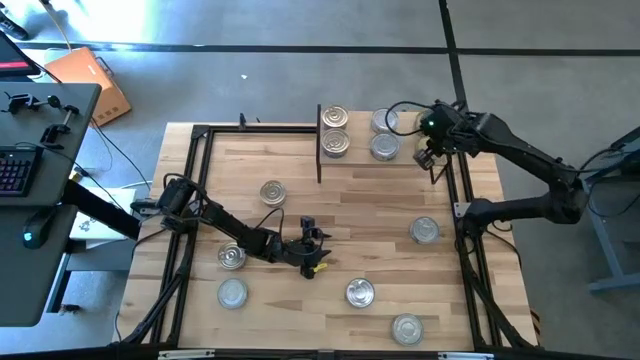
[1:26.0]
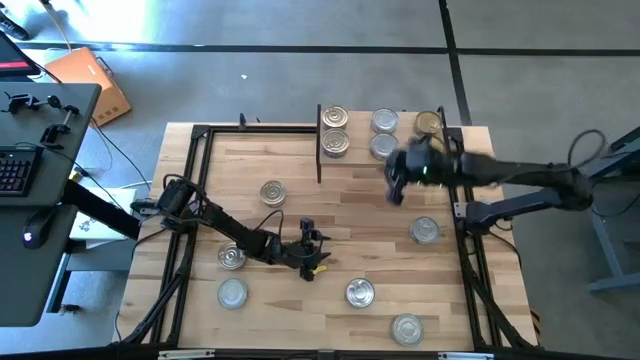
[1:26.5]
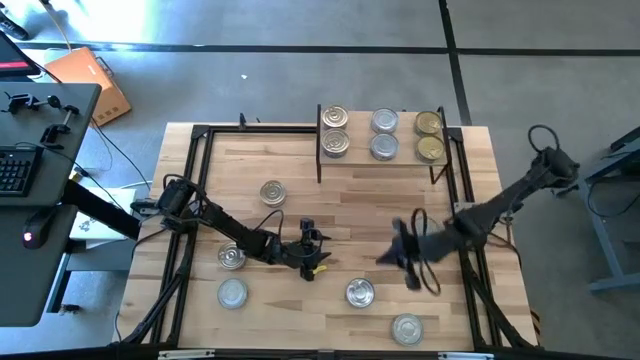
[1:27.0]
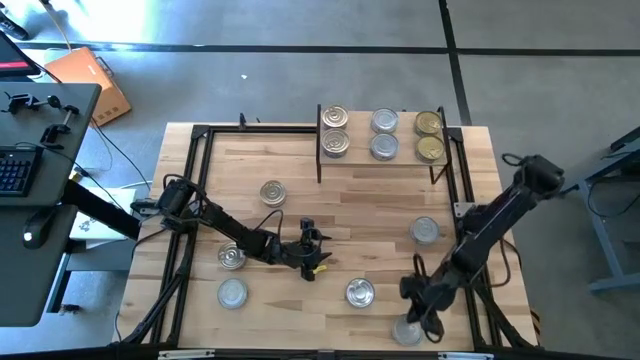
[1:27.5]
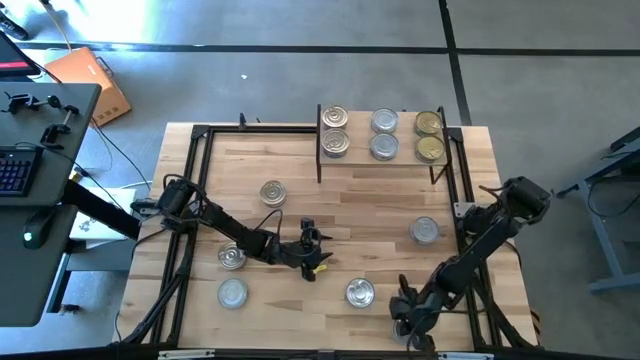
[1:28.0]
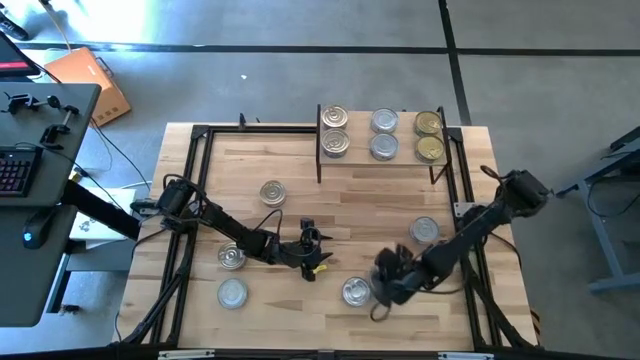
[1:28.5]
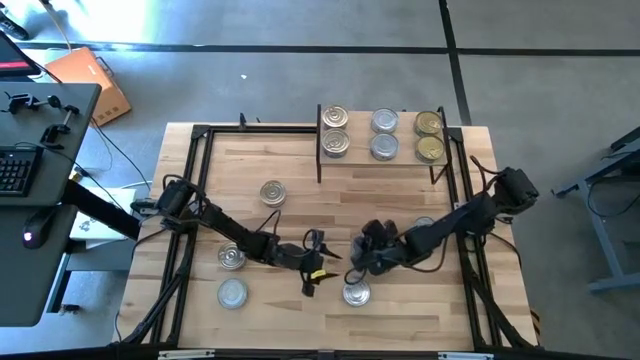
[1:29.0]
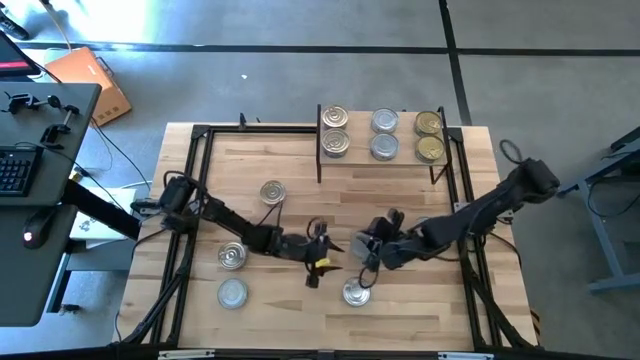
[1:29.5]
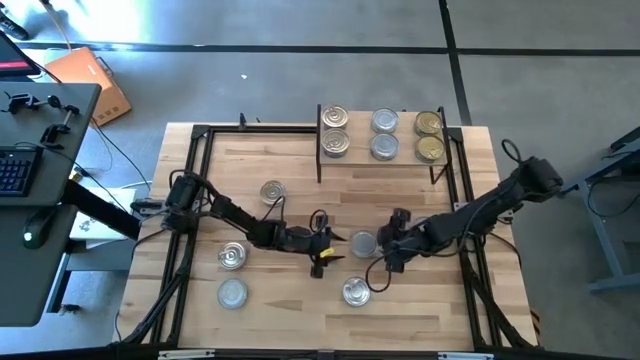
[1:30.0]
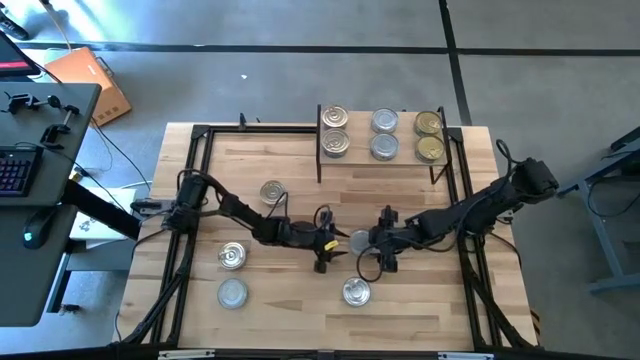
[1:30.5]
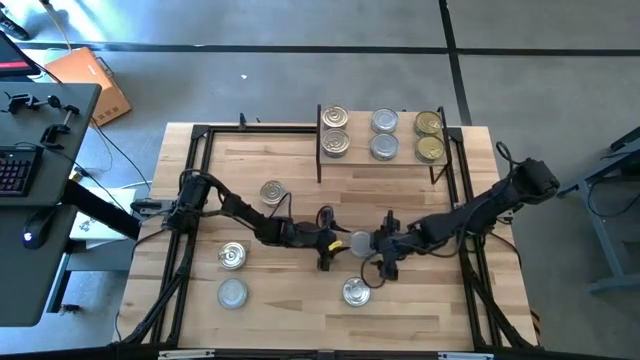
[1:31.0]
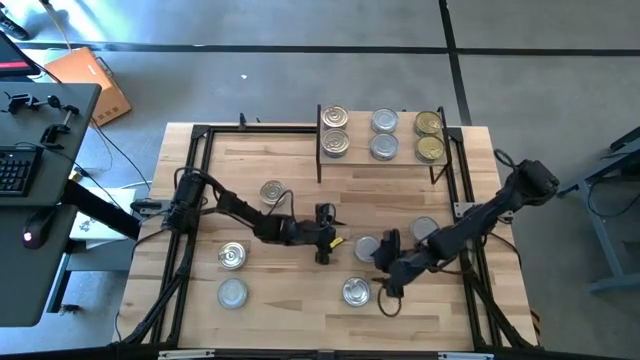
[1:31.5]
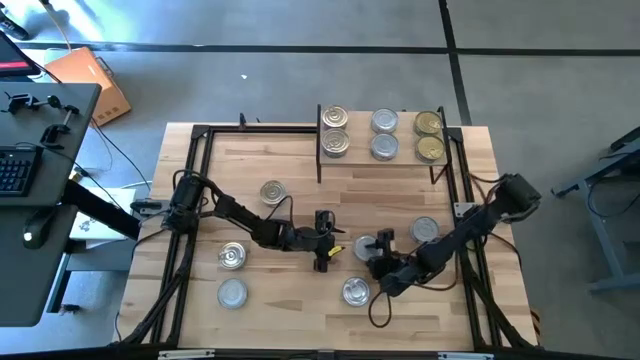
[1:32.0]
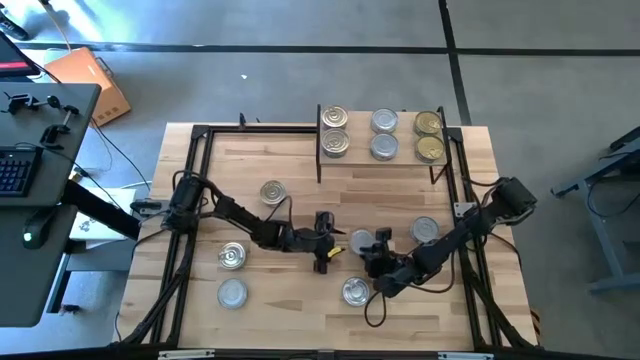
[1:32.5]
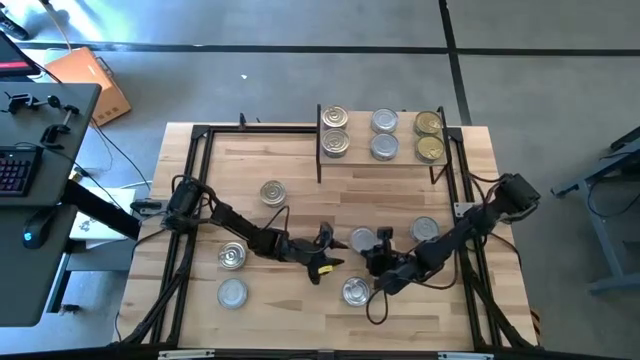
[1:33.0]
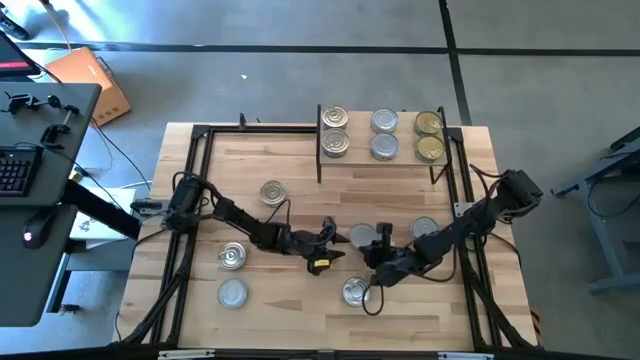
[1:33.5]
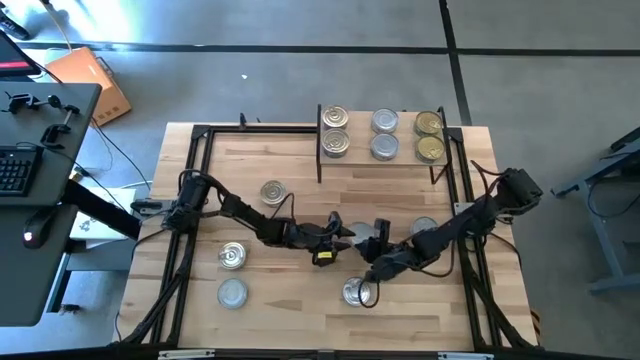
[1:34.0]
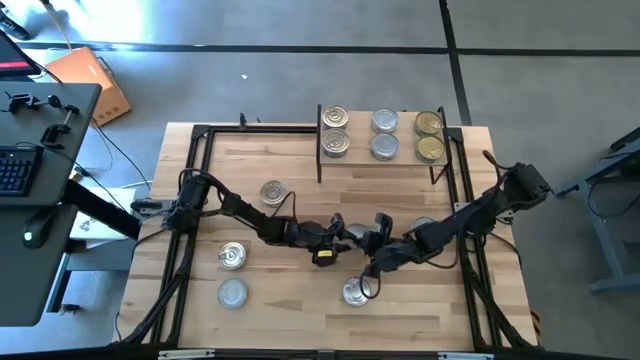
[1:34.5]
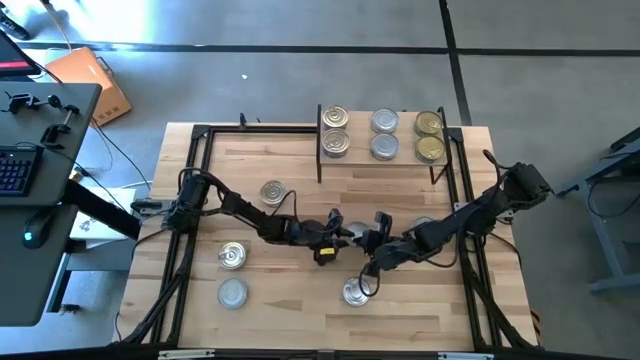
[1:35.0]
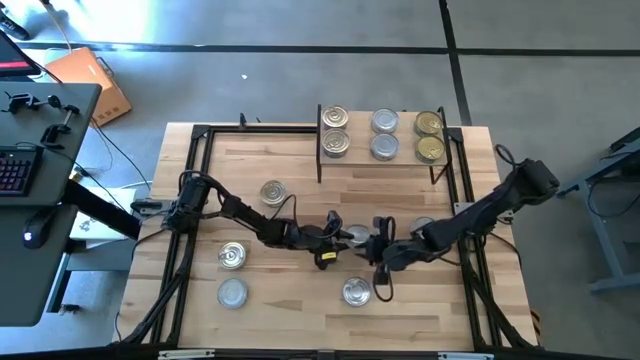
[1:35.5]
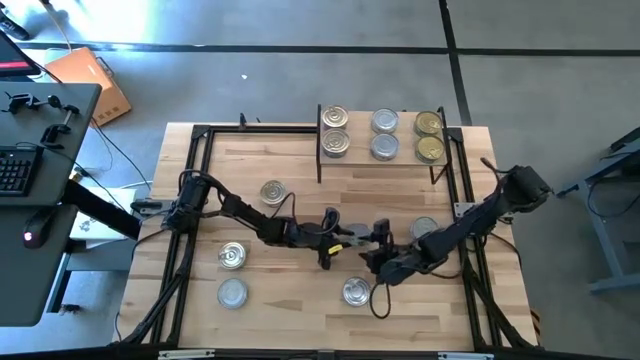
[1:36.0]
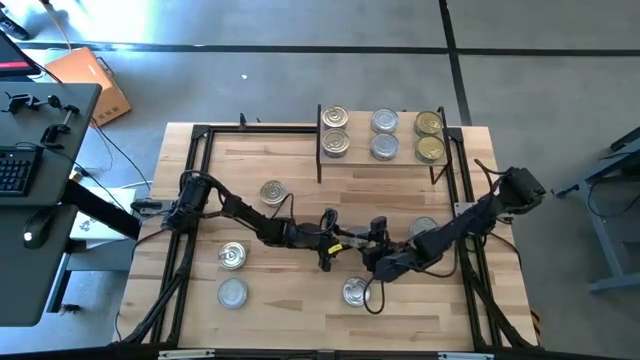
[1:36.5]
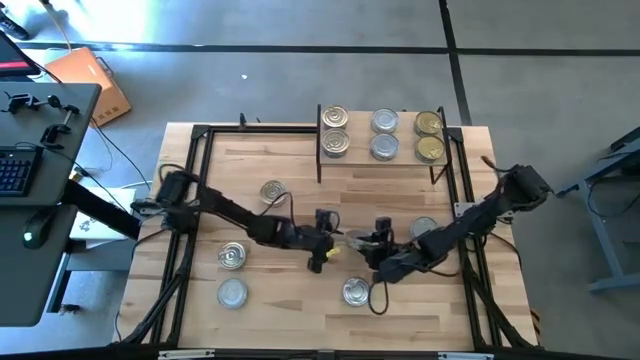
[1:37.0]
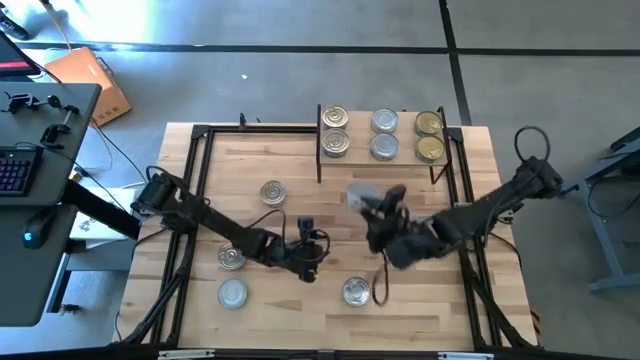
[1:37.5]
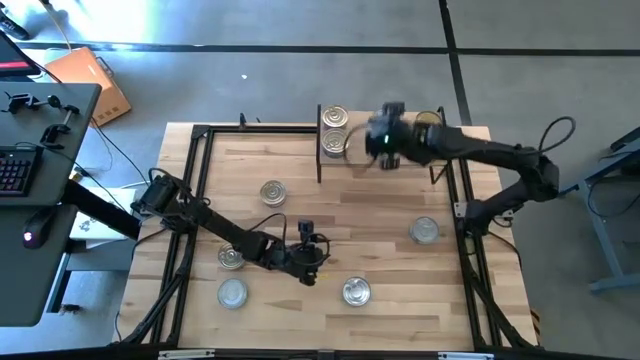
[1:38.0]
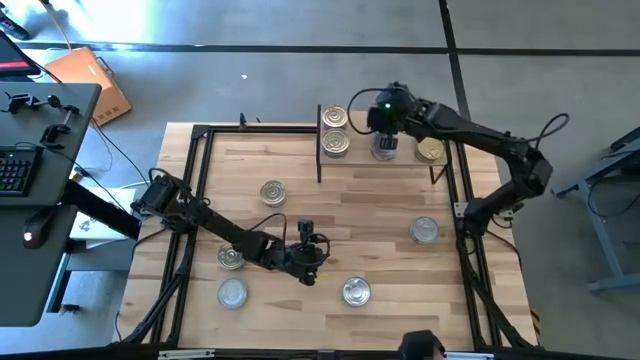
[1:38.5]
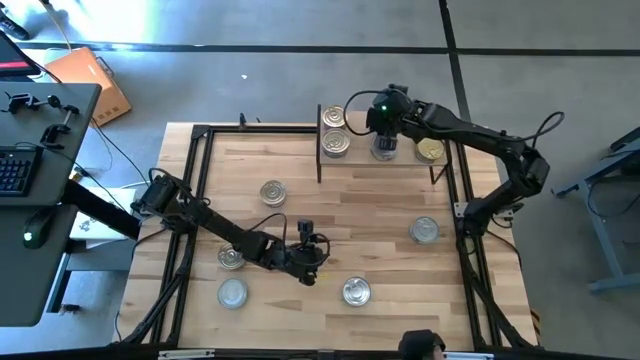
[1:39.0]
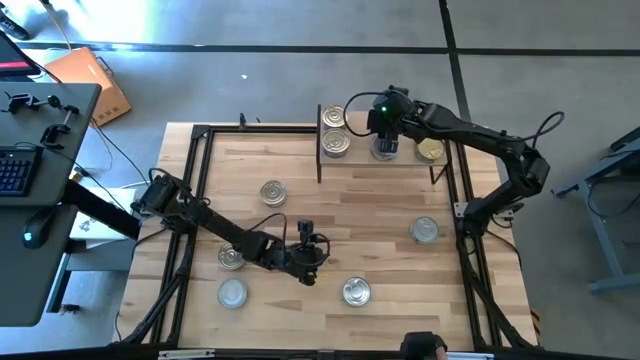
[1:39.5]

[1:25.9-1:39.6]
Task: Stack canned seafood by type on shelf
Stack the green white tuna can on top of the other green white tuna can on the shelf

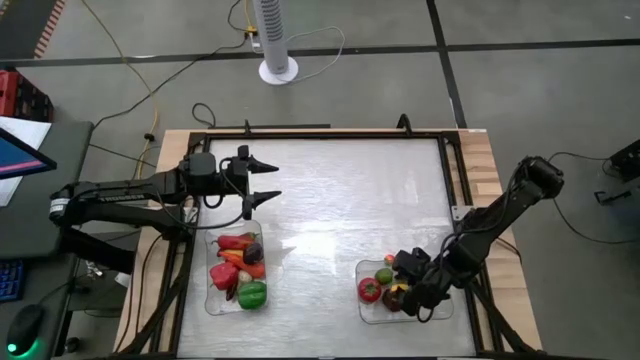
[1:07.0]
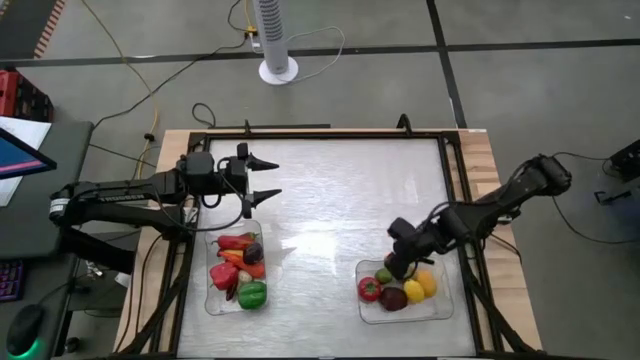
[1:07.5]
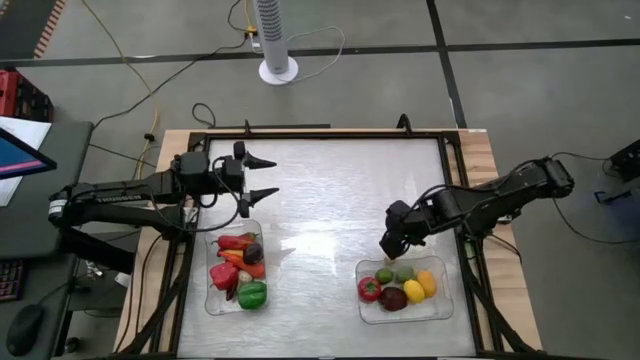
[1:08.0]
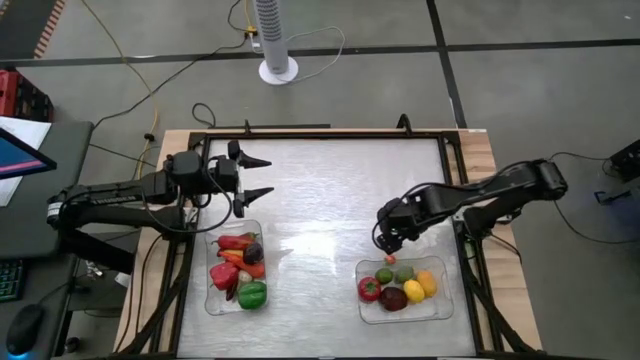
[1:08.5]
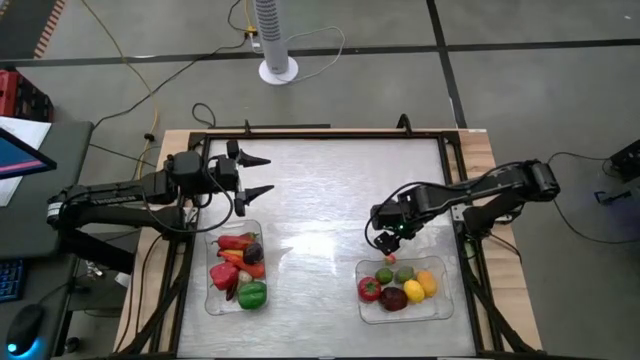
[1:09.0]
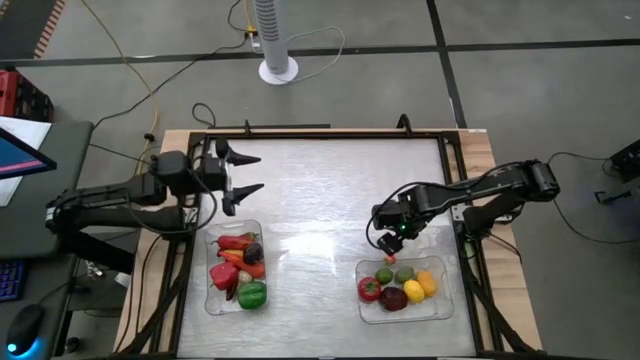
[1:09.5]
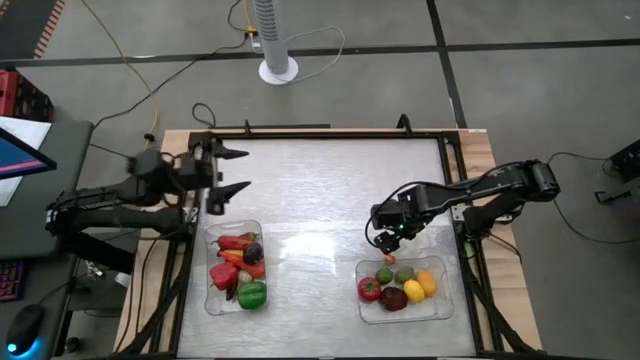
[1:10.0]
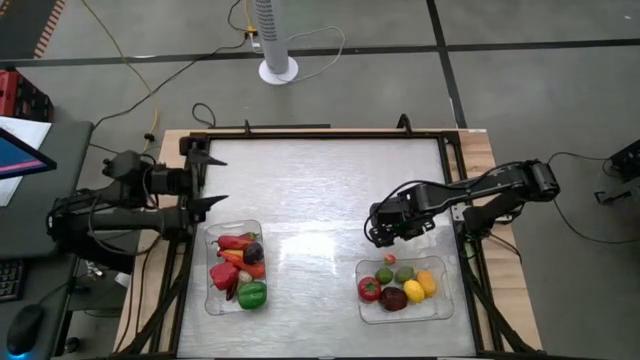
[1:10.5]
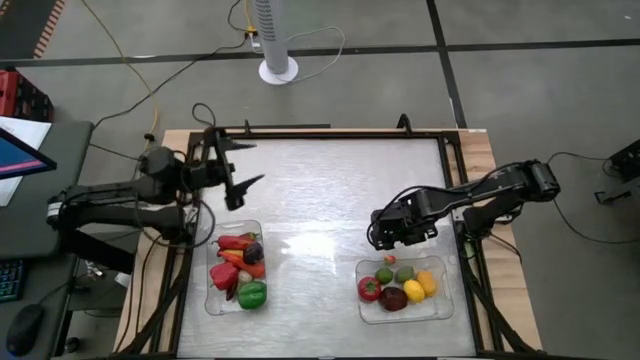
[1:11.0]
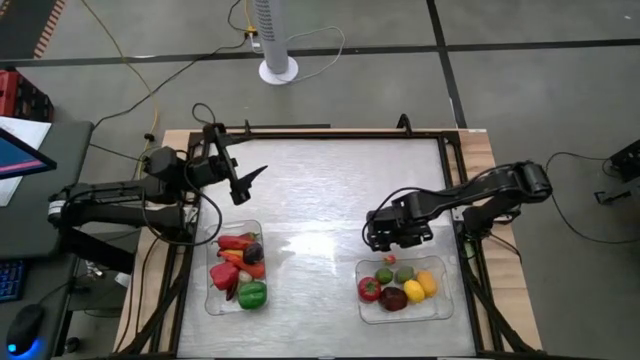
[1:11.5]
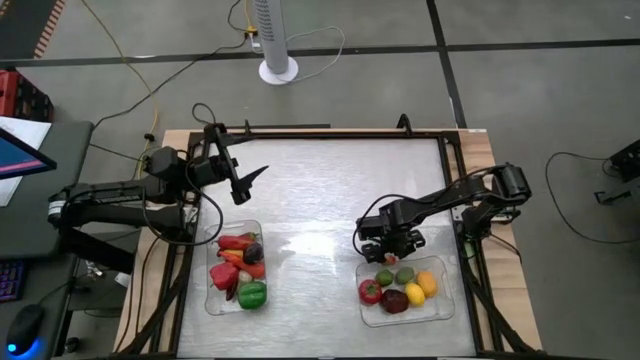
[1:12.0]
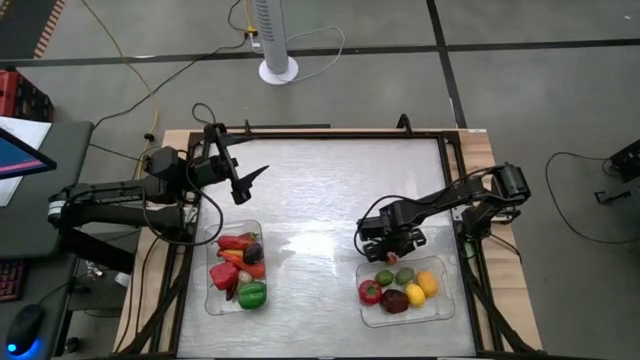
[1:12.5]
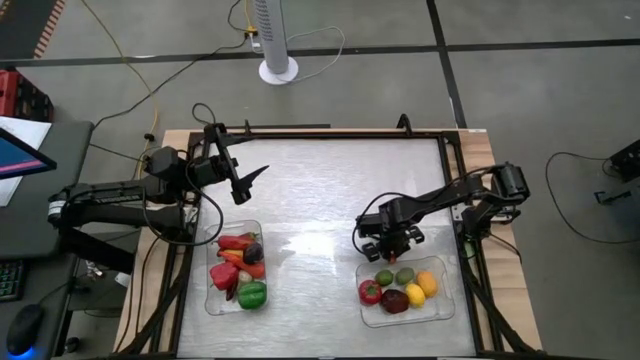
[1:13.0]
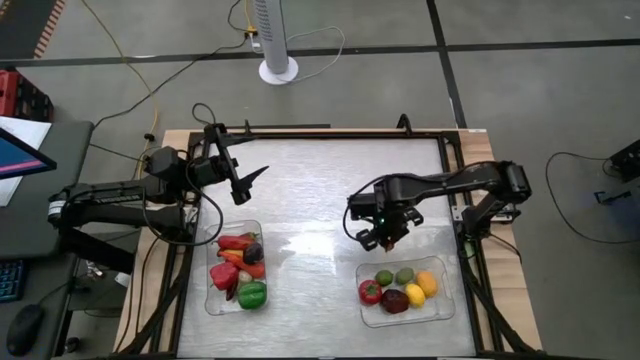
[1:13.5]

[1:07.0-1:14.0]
Task: Sort produce into baskets
Put the peach into the right transparent bin
